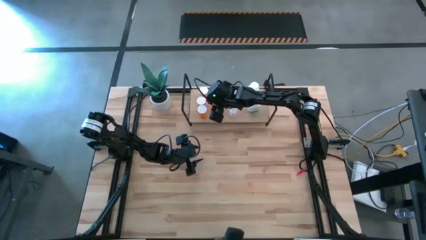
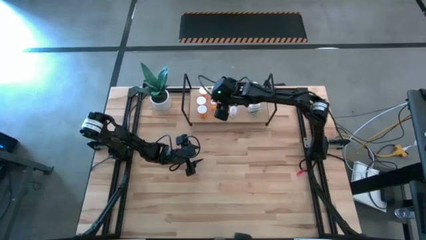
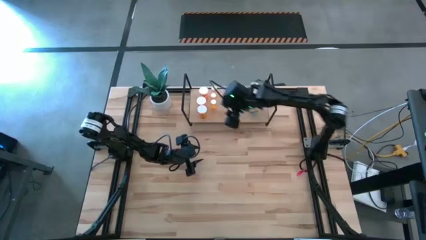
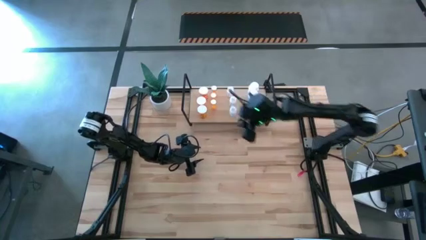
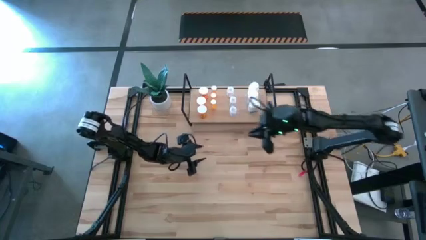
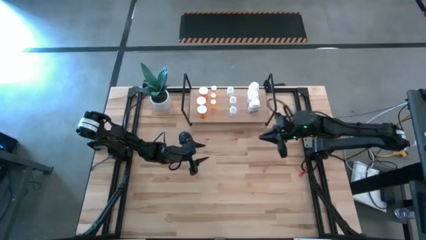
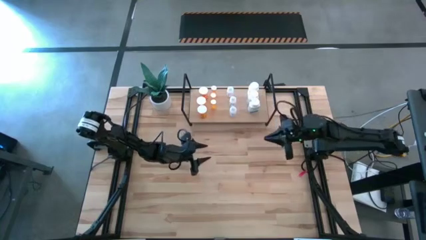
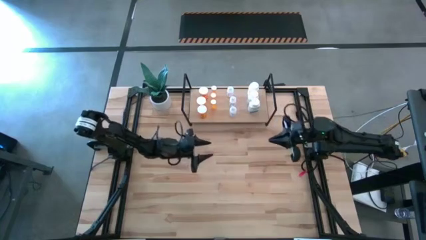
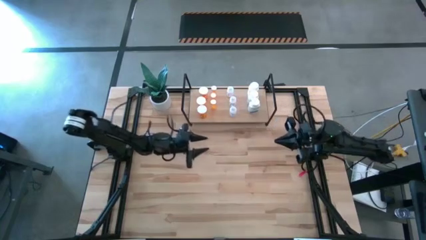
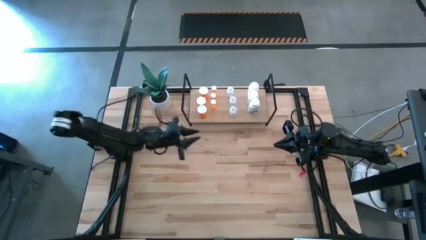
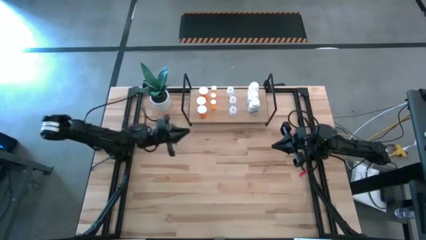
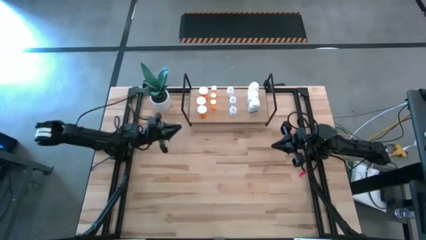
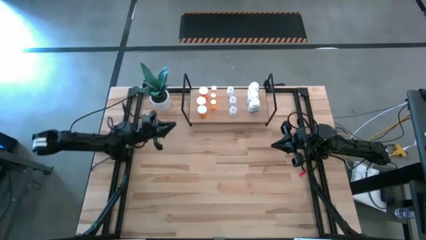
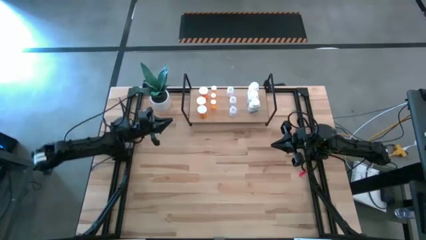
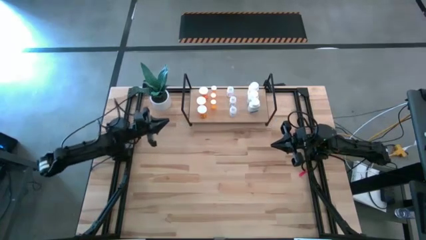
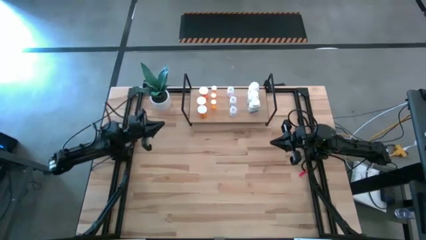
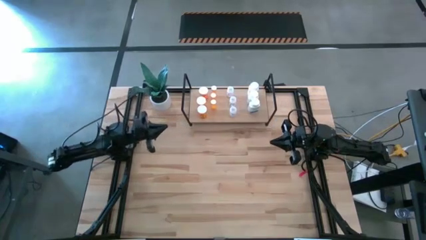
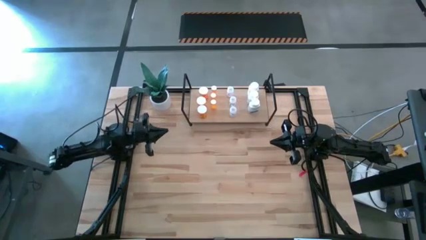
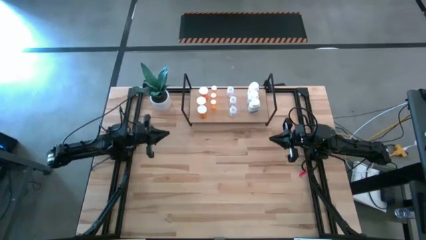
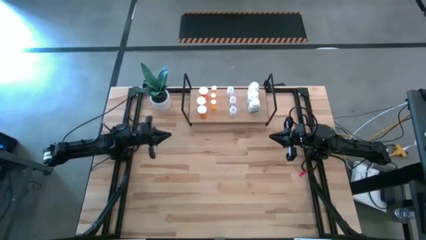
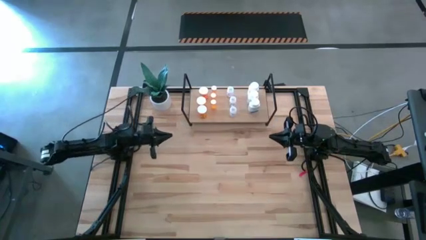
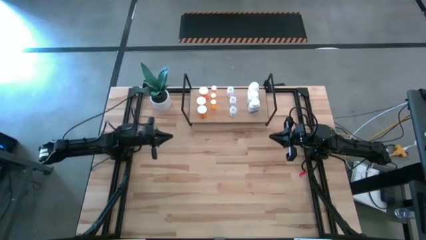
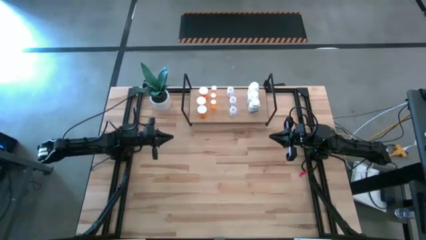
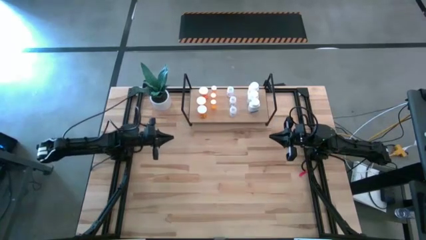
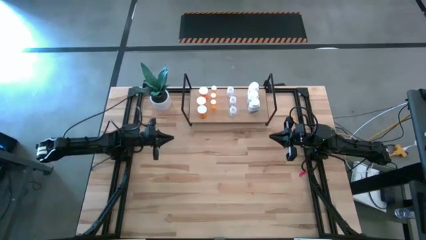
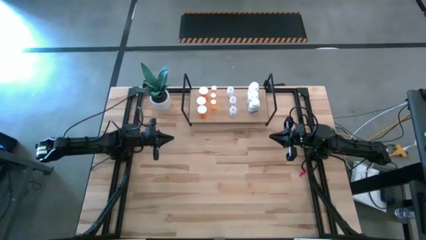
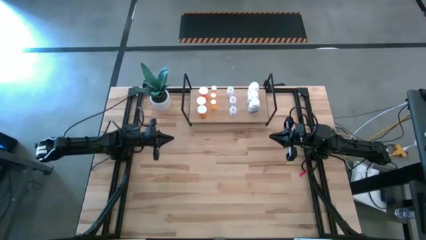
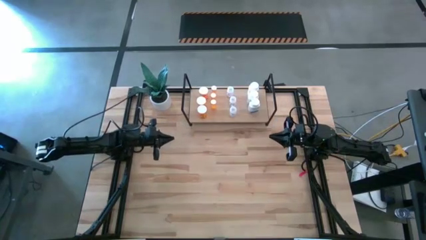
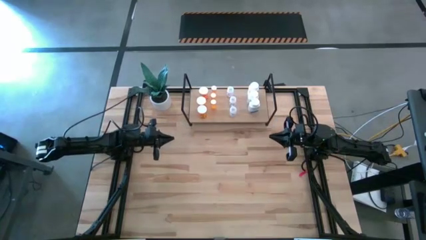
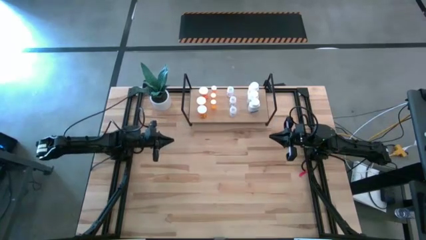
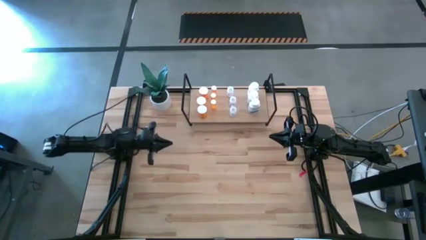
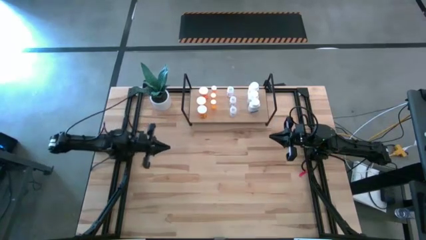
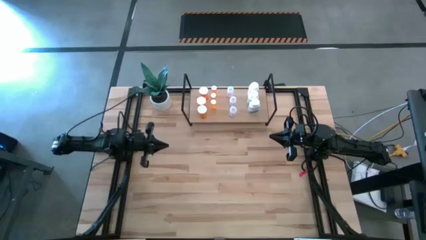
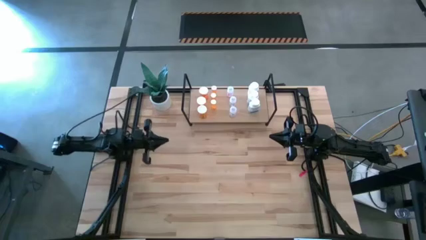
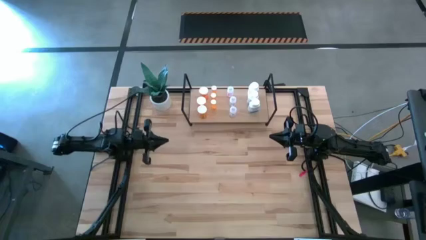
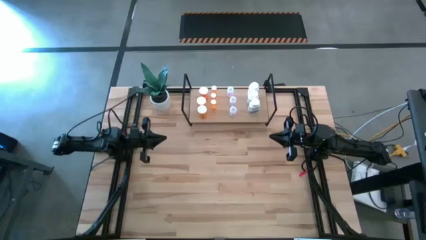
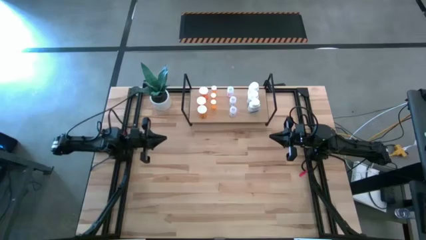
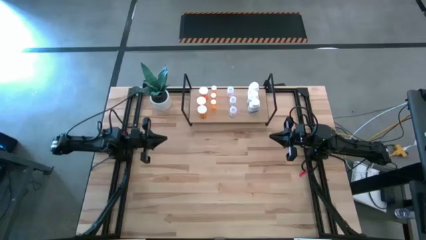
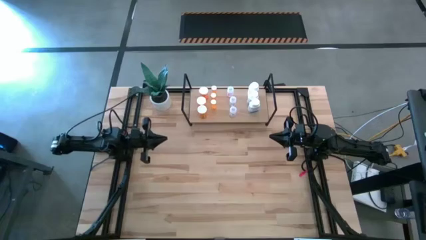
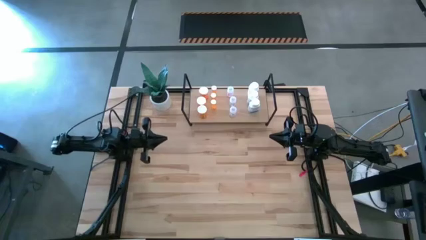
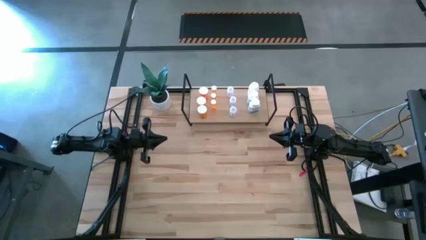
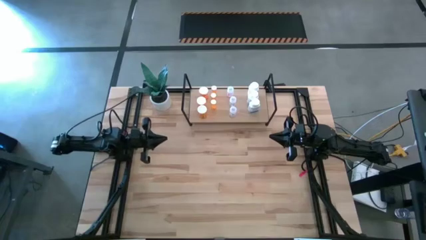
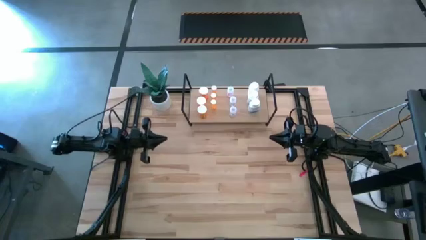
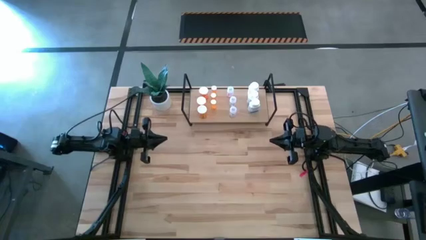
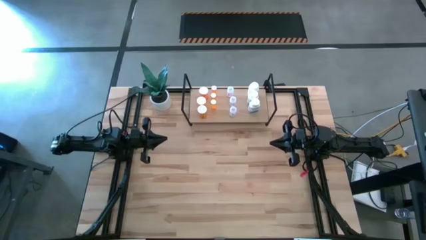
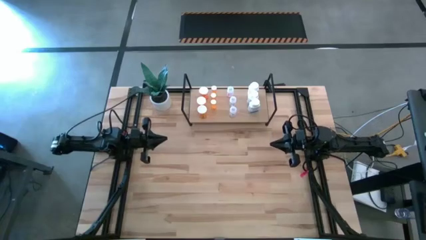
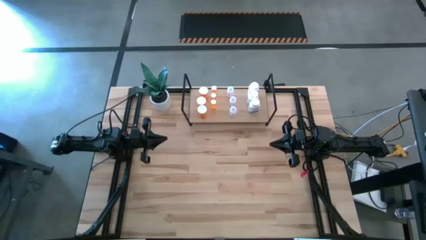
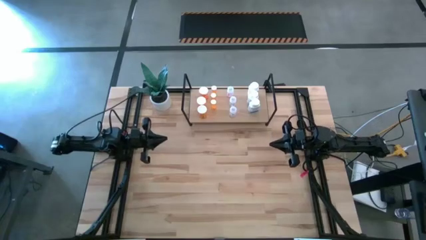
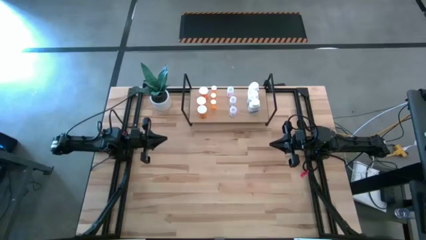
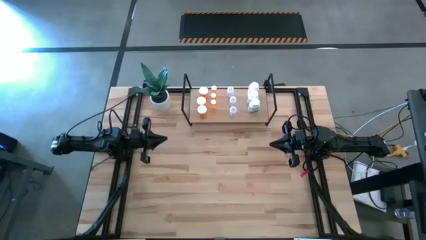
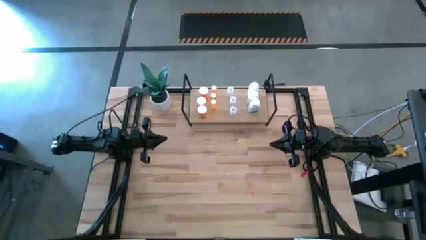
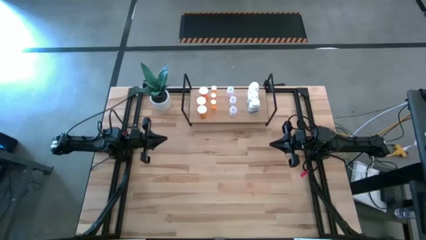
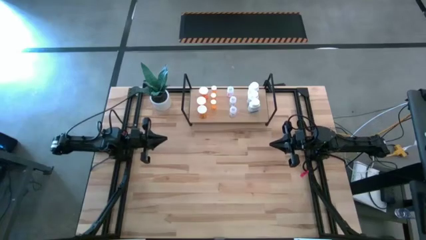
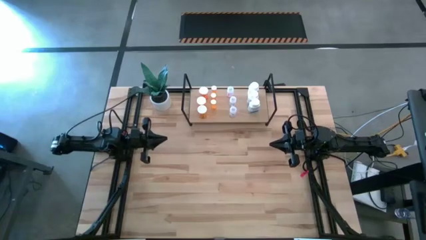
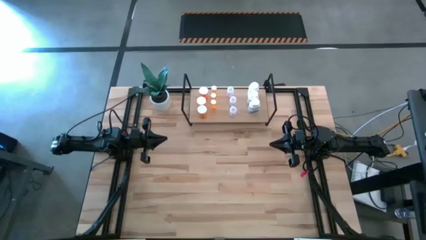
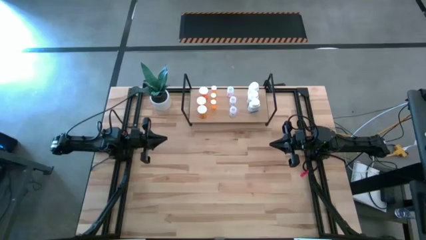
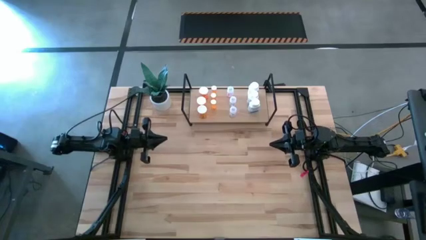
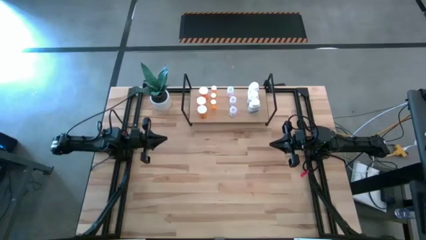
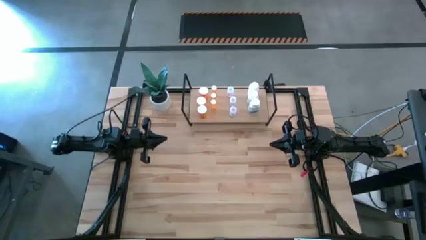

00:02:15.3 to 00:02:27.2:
Task: Pick and place medicine bottles onto shelf by color
Return to Home Position

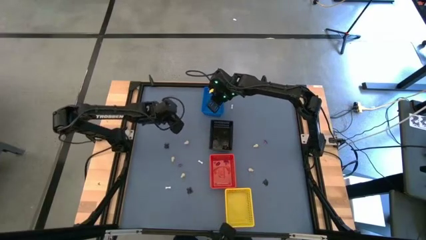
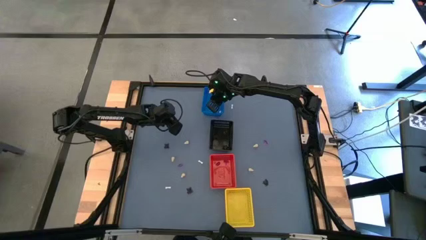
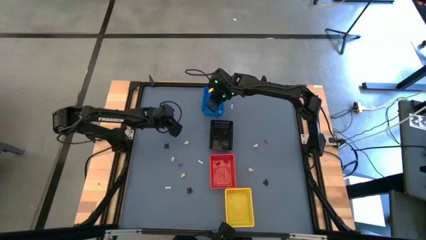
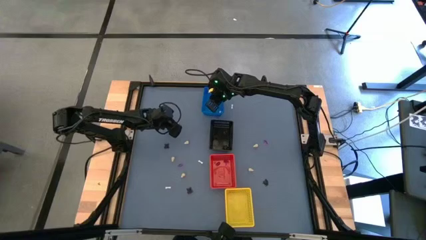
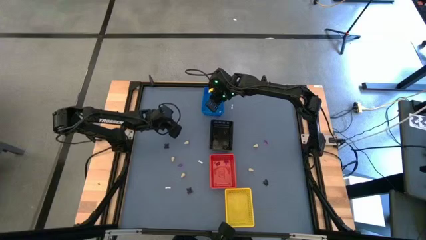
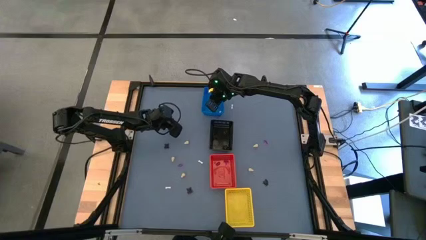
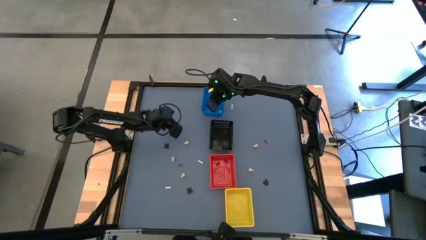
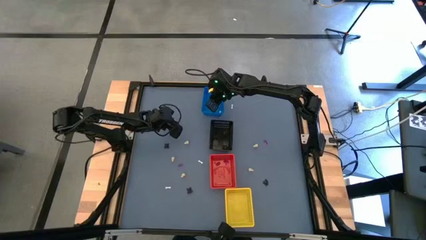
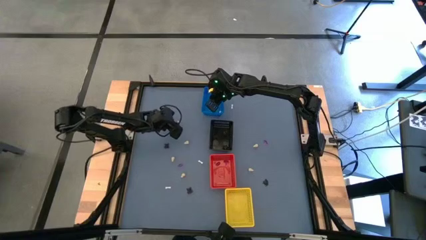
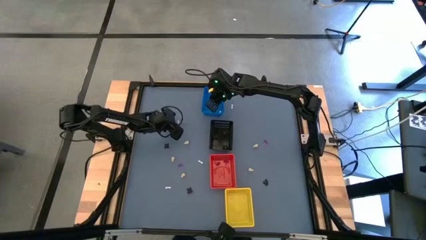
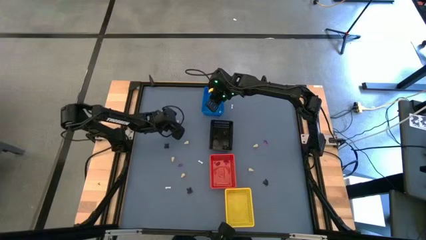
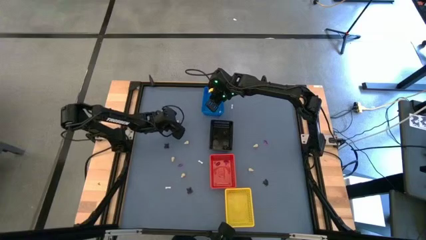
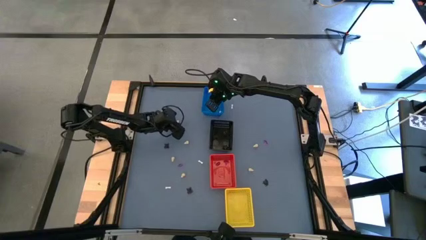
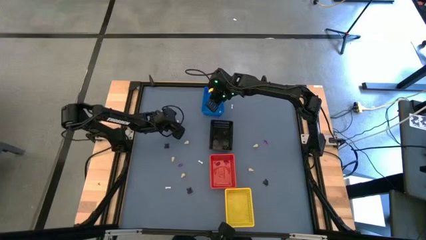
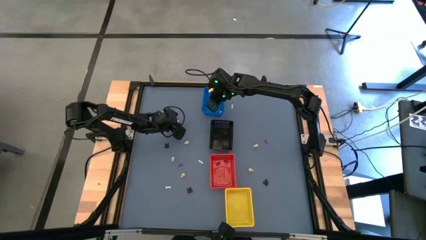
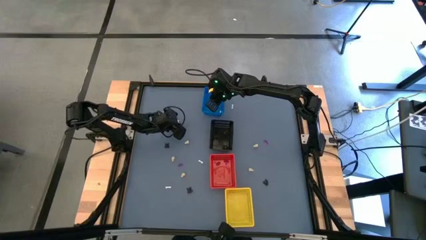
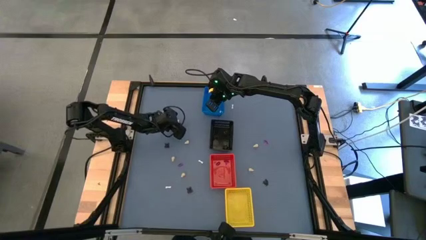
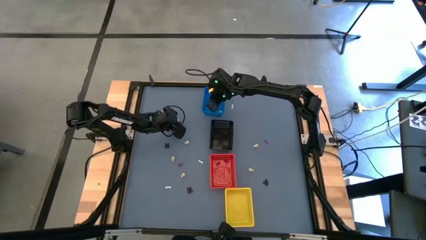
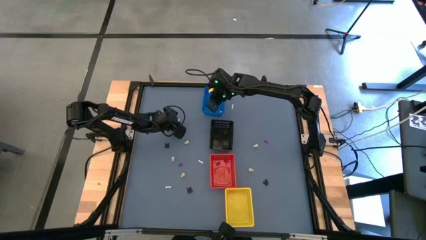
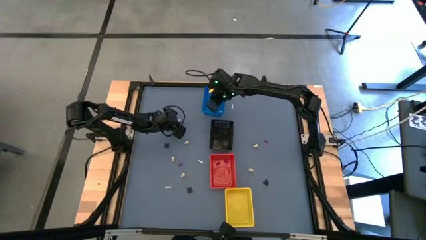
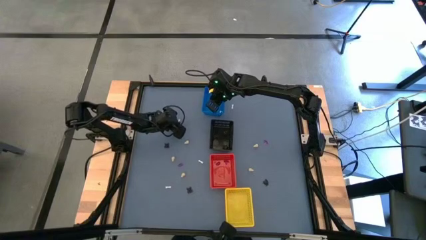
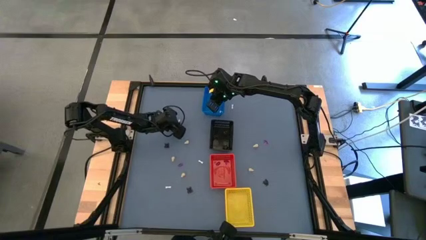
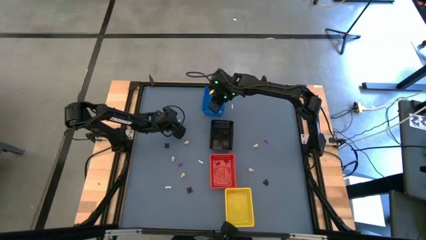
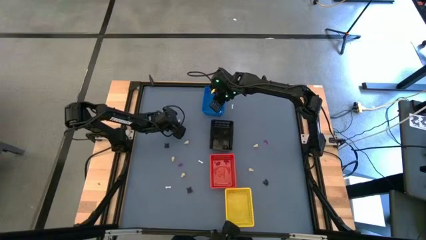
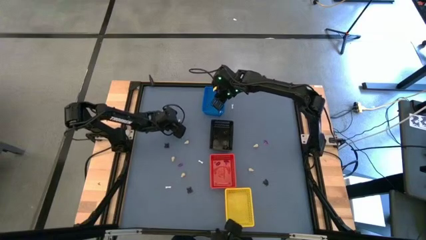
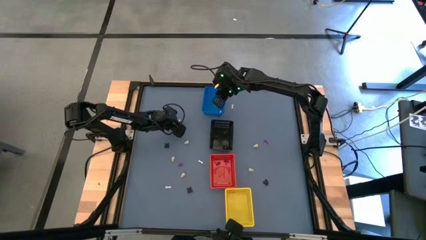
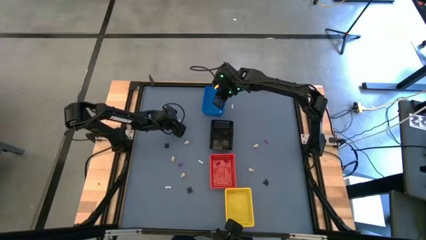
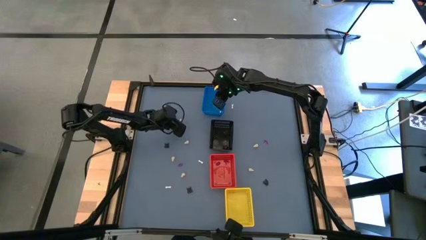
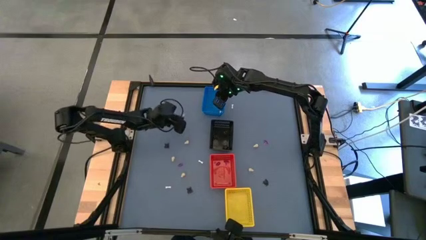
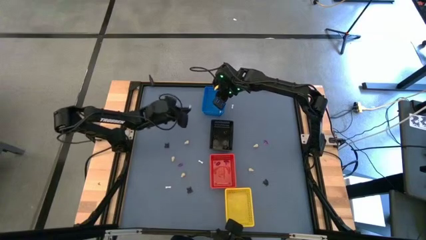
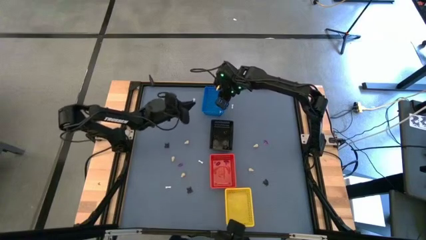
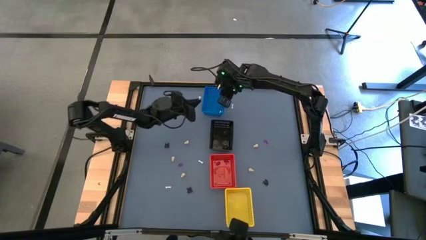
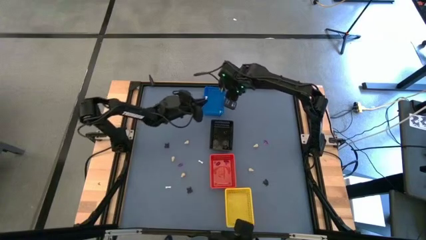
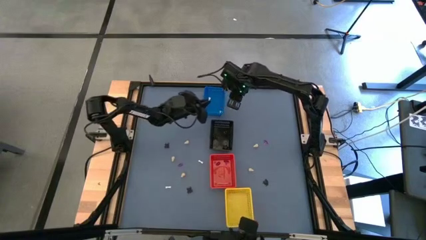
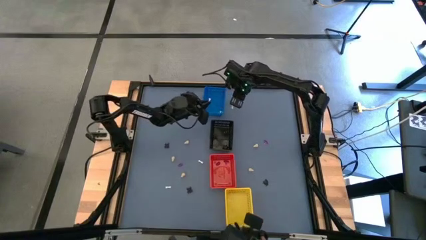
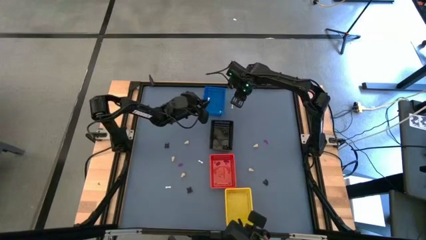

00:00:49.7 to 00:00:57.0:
Task: Sort Halloween decoration
Put the white bone toy into the blue bin
